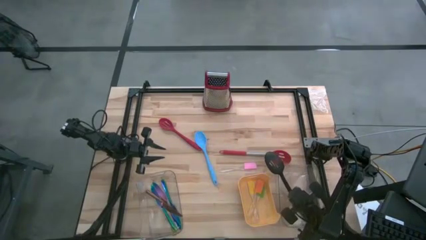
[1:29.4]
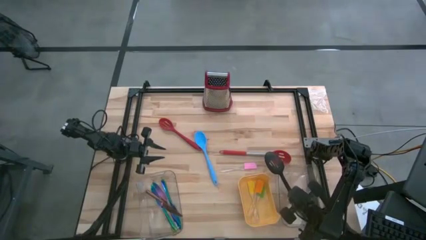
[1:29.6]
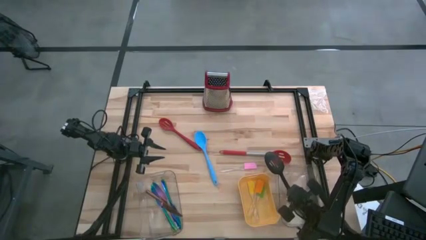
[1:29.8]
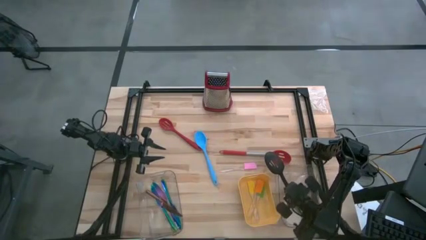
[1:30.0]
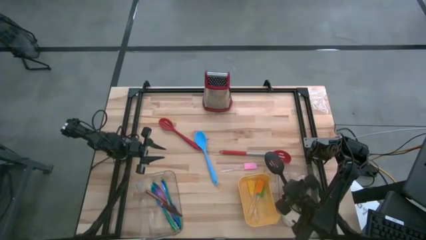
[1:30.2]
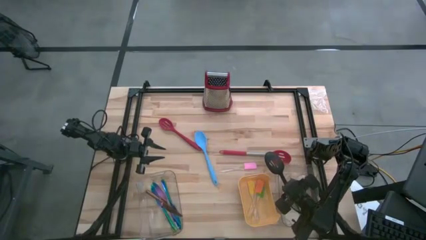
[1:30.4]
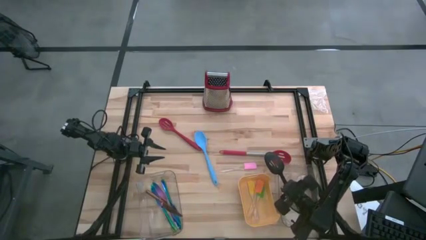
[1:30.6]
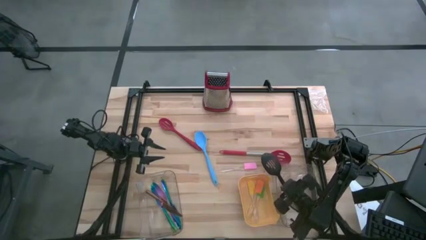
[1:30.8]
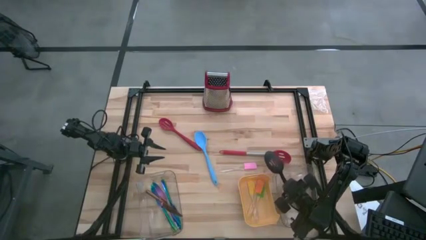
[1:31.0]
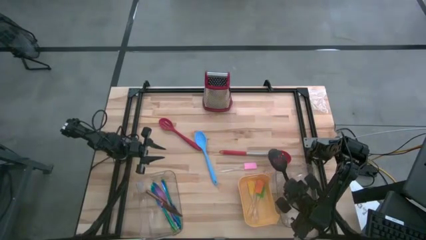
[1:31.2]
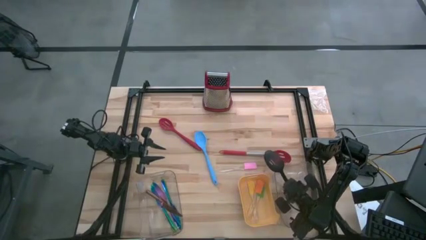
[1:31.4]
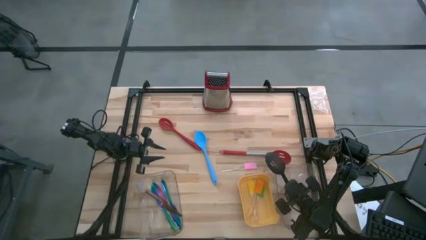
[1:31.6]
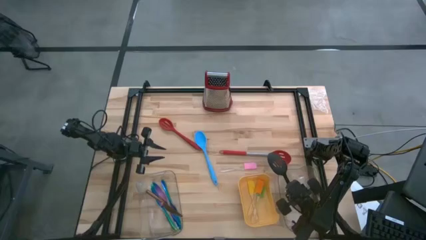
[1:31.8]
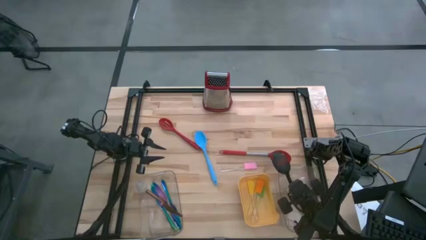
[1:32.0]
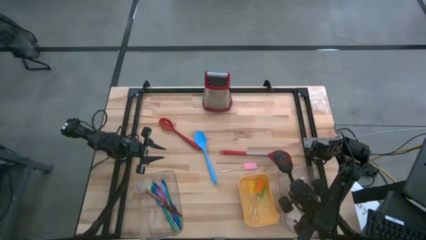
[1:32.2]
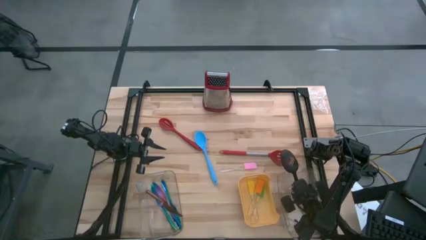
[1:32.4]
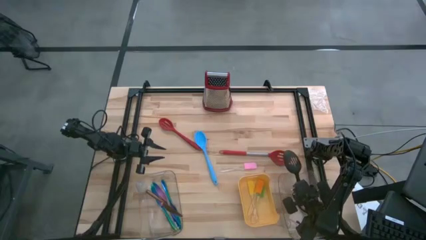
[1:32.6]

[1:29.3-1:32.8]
Task: Pick & Place Kitchen Items
Put the black serving spoon into the right transparent bin

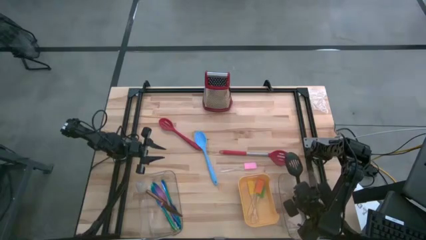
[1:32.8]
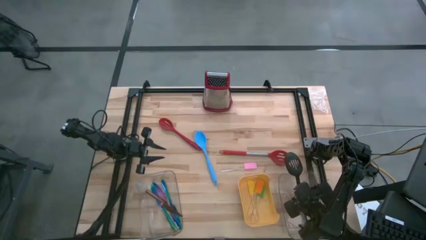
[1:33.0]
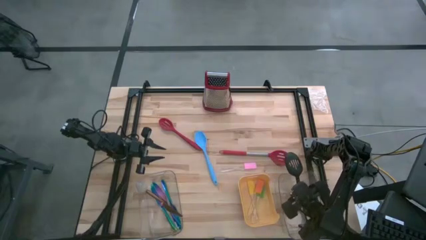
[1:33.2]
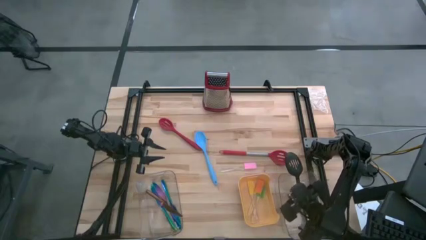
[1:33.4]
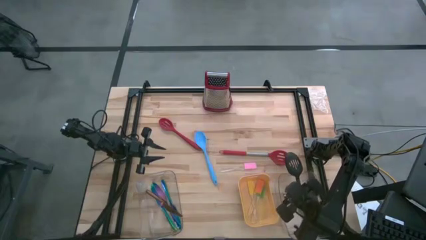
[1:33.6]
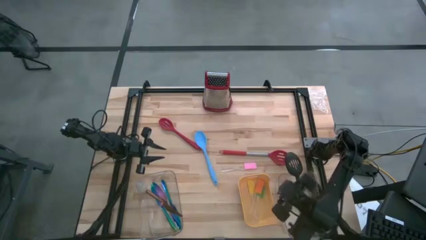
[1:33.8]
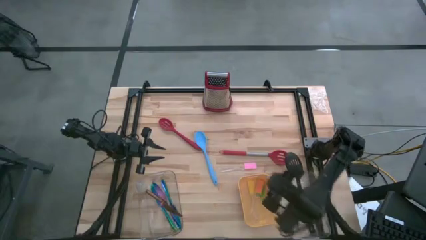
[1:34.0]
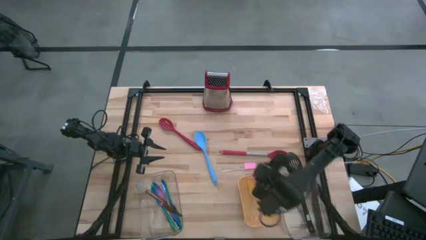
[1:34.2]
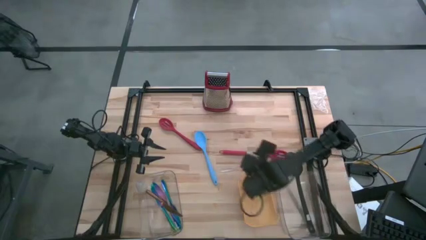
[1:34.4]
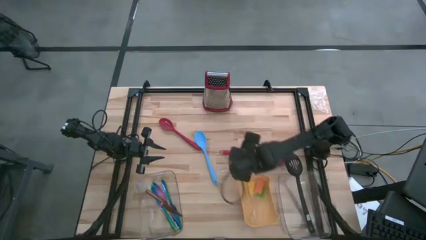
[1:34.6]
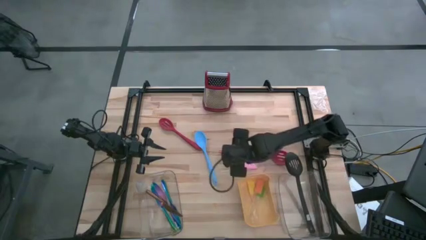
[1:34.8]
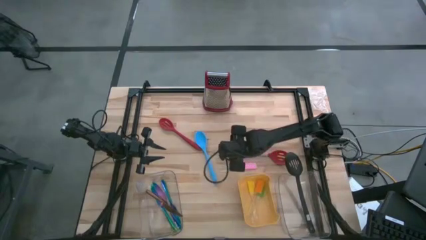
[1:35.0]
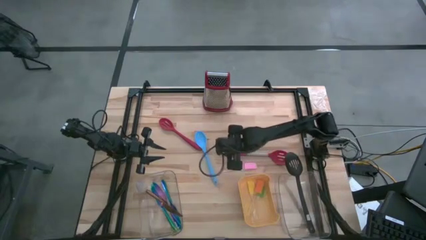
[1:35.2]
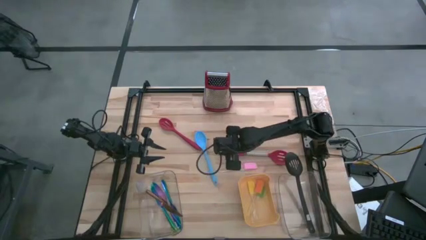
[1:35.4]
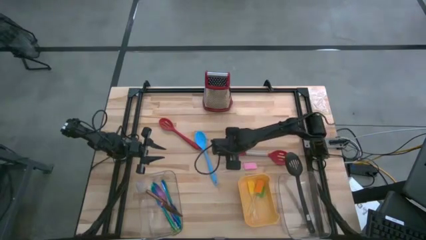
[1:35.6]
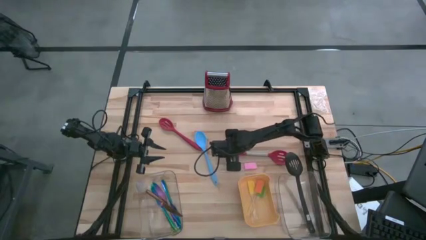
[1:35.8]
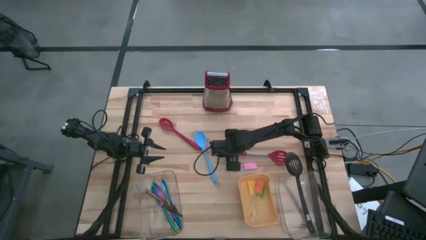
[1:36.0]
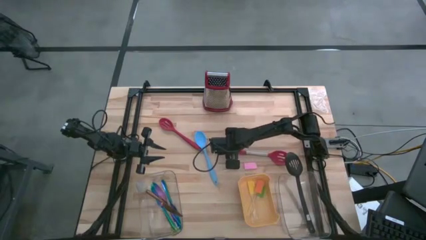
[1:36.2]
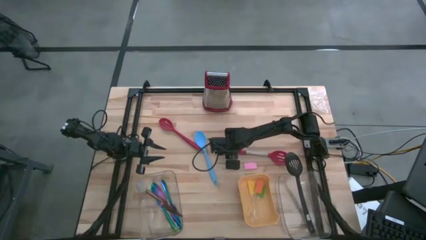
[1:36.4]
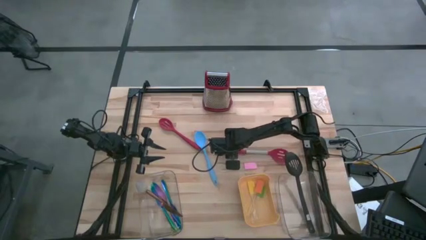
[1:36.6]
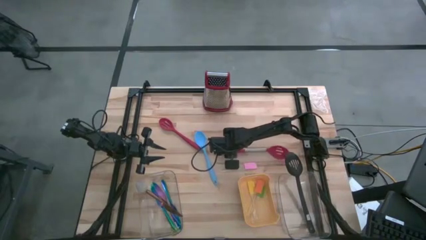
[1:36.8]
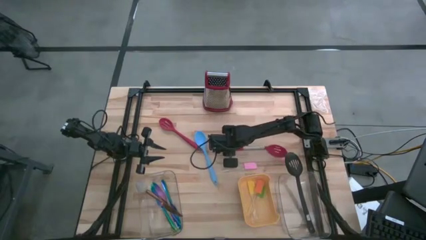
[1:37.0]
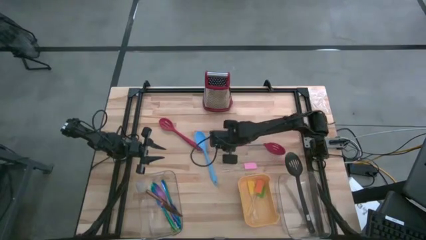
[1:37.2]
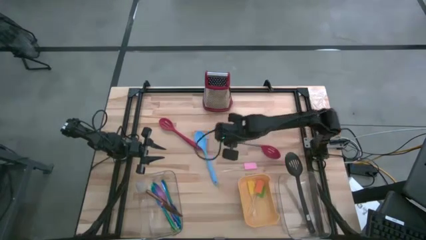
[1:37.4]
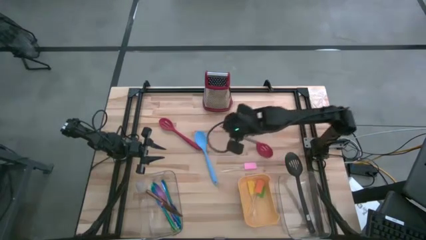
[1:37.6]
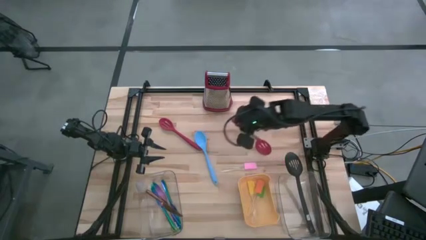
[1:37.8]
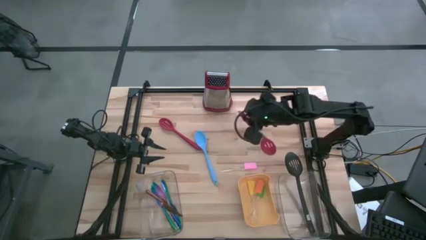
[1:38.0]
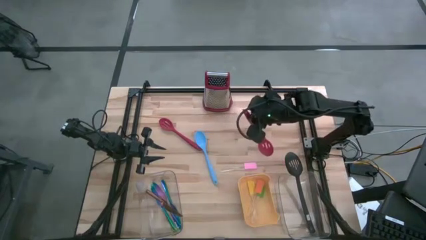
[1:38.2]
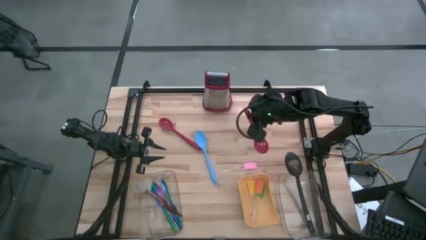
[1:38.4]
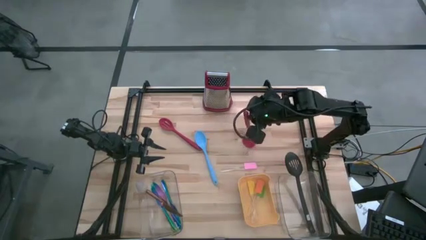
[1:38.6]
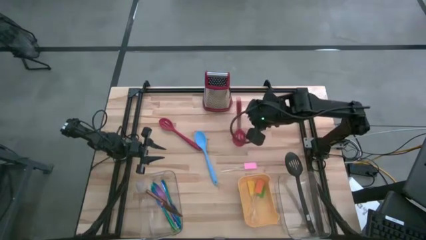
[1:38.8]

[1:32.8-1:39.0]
Put the right red serving spoon into the right transparent bin

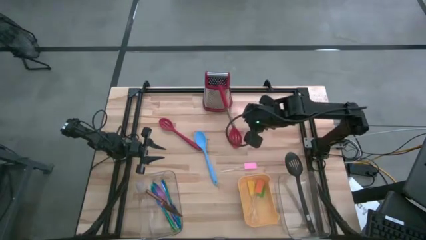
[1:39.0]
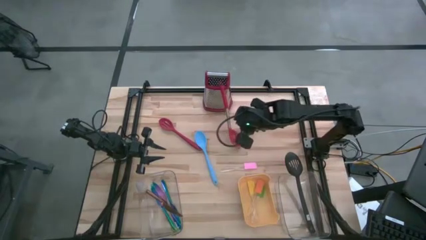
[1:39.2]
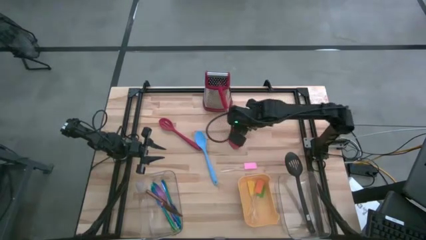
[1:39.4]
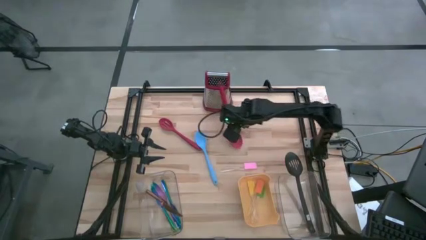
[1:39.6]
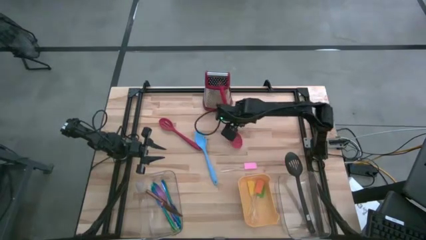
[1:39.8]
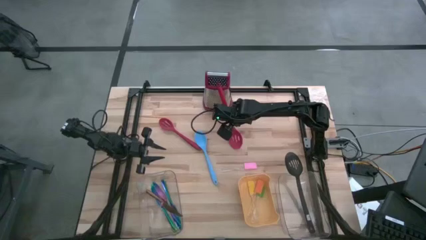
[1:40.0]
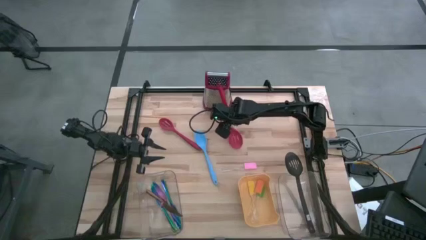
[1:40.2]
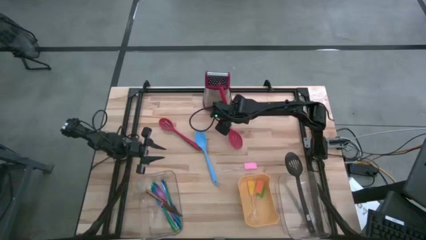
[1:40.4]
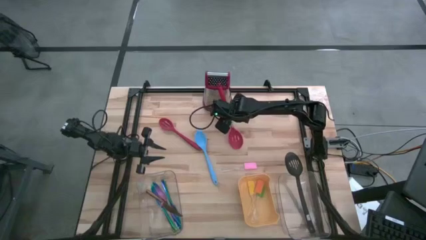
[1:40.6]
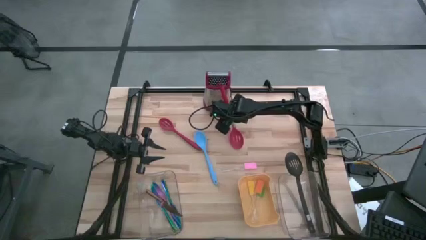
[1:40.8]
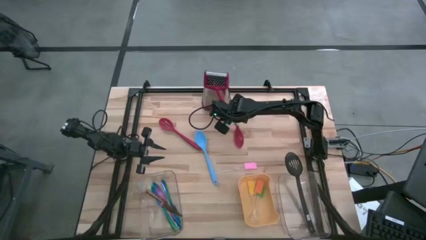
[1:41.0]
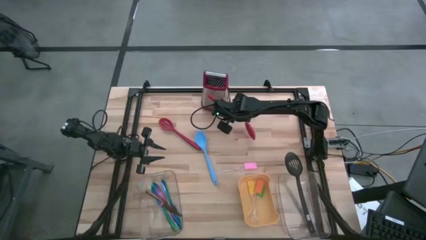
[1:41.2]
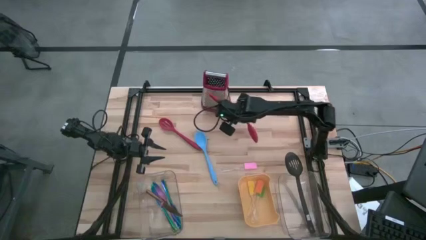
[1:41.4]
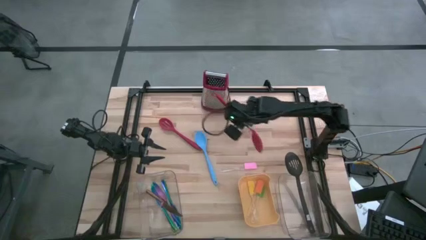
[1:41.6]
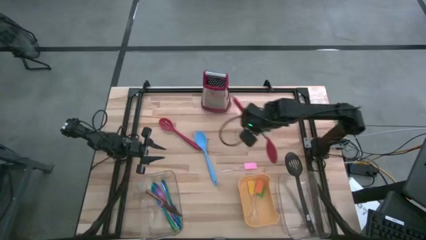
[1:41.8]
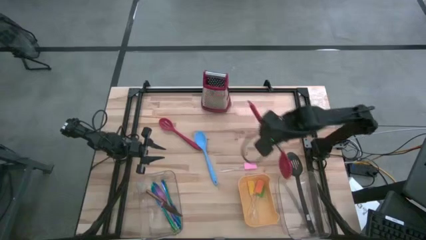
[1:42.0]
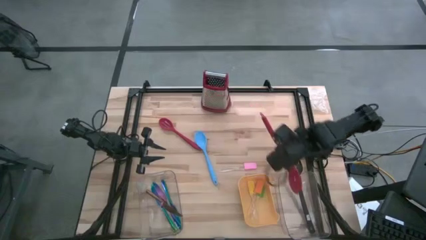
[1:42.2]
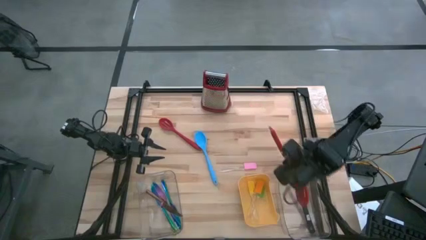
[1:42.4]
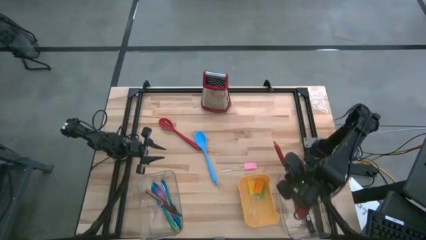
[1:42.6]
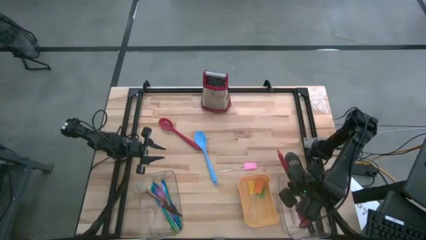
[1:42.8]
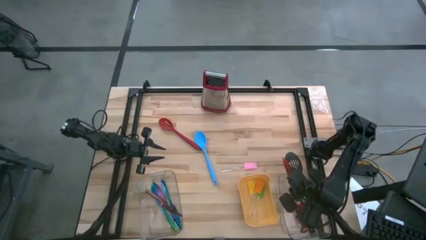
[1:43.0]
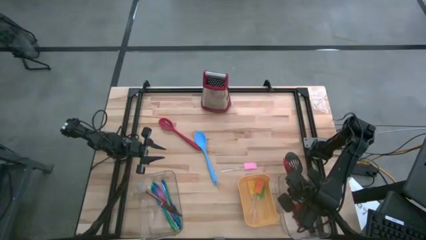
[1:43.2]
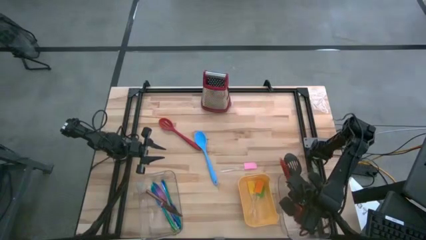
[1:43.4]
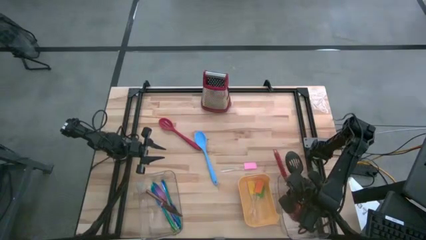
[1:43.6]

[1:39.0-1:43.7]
Put the right red serving spoon into the right transparent bin

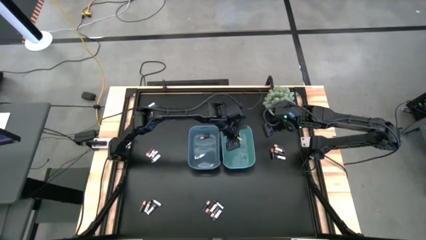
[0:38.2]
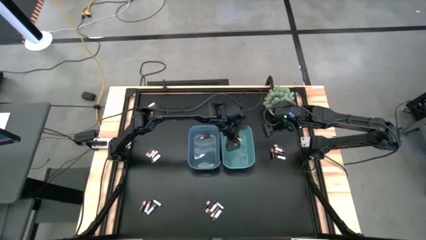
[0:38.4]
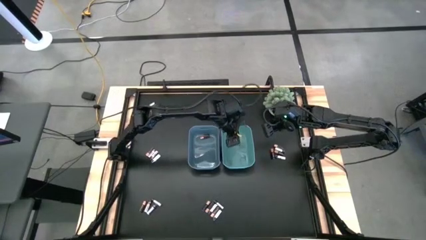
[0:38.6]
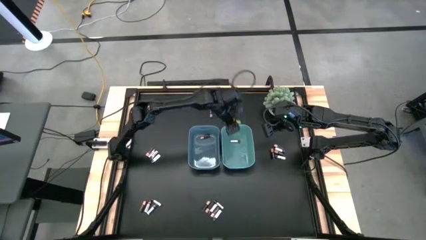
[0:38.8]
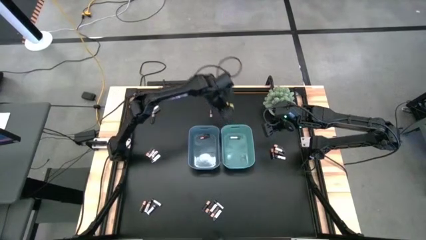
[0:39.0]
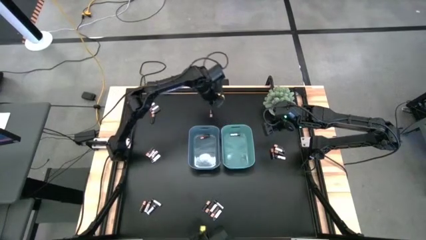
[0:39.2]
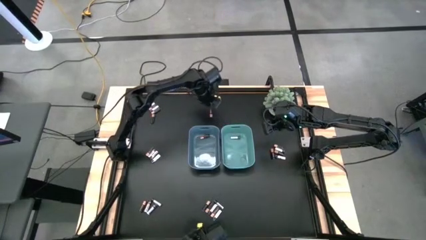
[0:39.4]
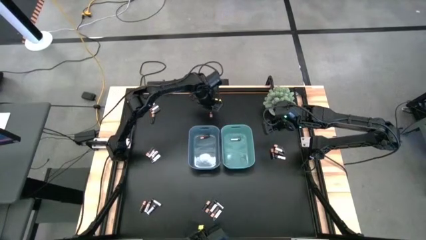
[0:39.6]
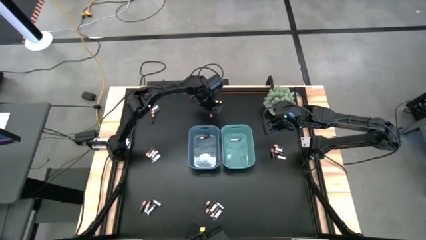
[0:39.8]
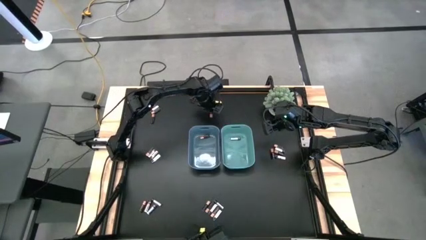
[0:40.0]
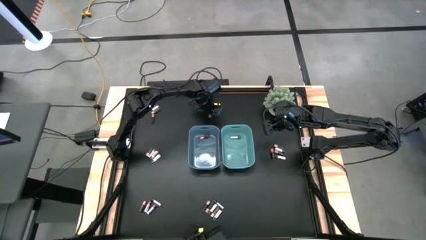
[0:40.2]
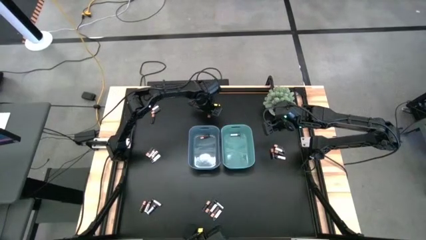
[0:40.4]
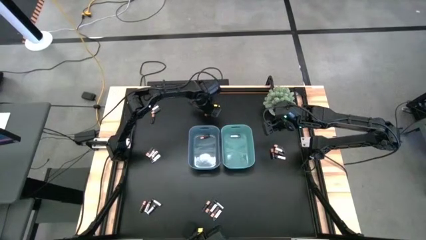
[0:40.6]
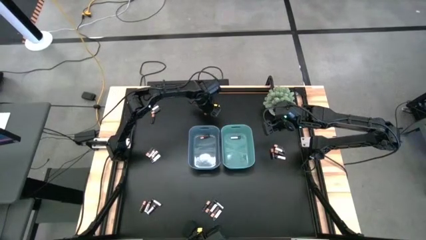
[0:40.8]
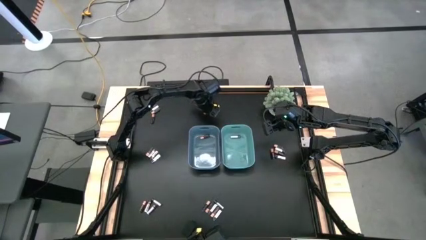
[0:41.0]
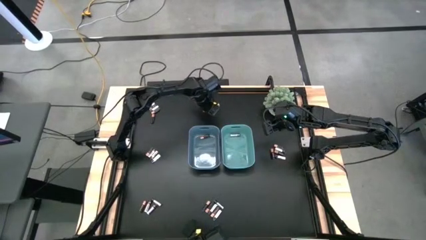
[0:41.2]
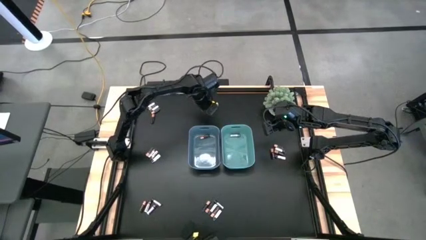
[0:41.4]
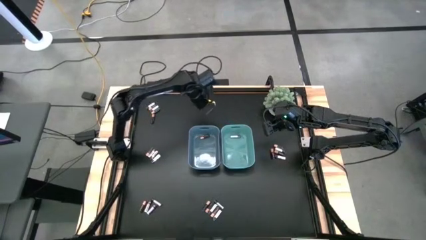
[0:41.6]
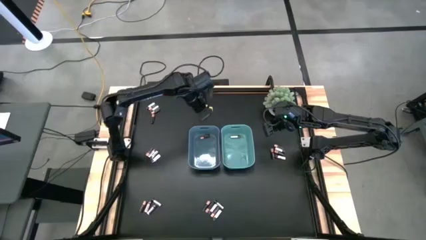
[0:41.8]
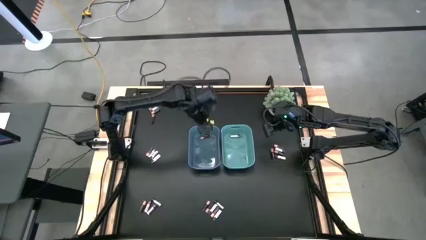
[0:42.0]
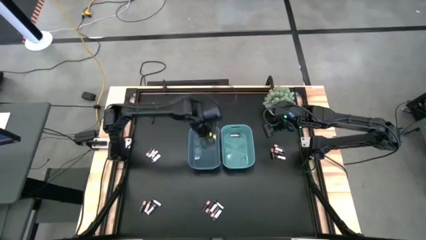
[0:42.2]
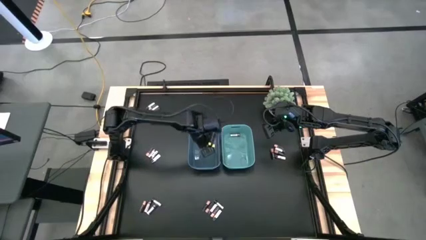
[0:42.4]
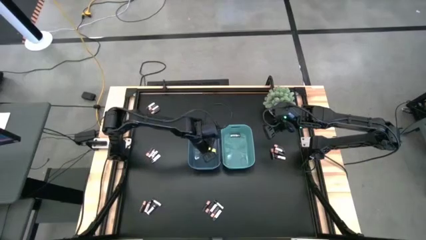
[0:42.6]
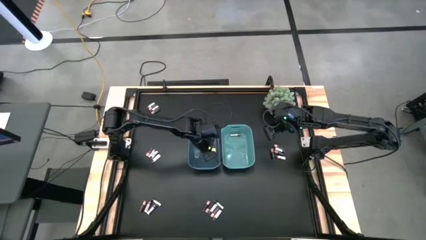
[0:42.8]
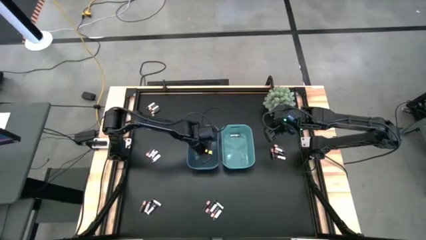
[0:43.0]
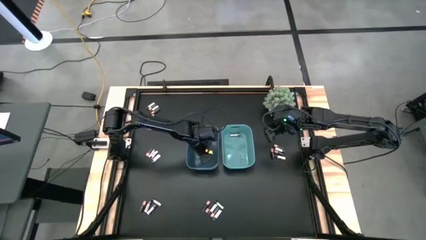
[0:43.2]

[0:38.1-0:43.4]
Task: Sort batteries
Put the black battery into the blue bin
